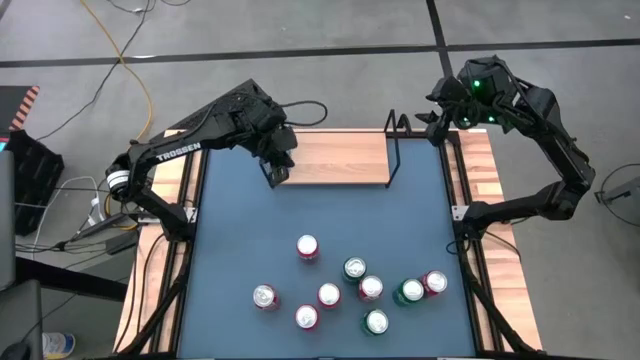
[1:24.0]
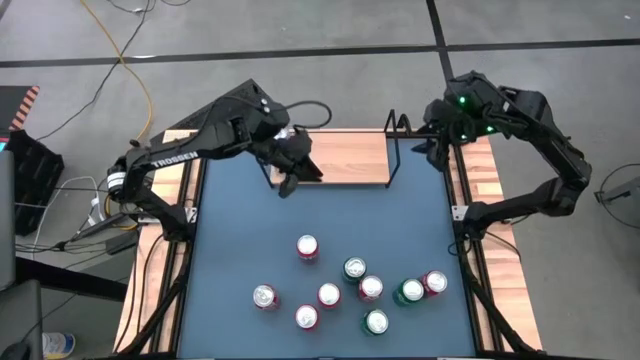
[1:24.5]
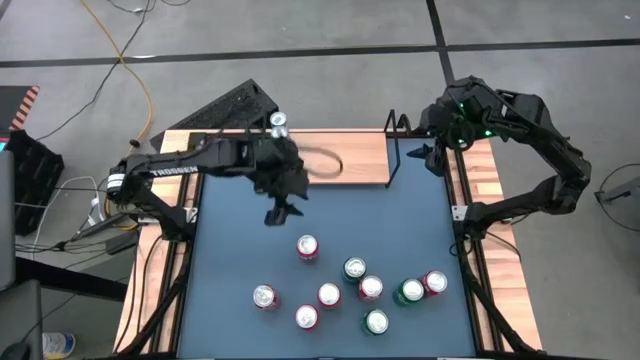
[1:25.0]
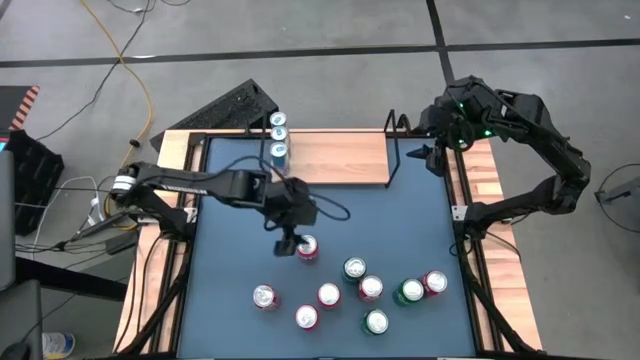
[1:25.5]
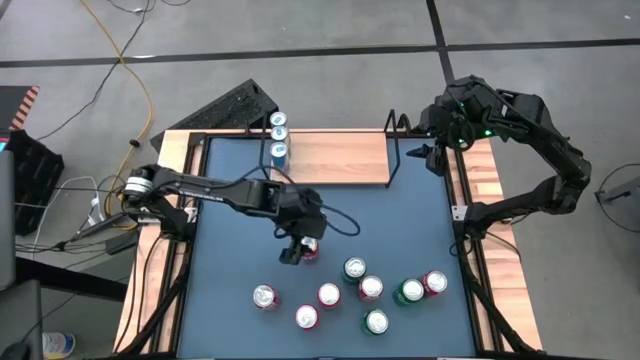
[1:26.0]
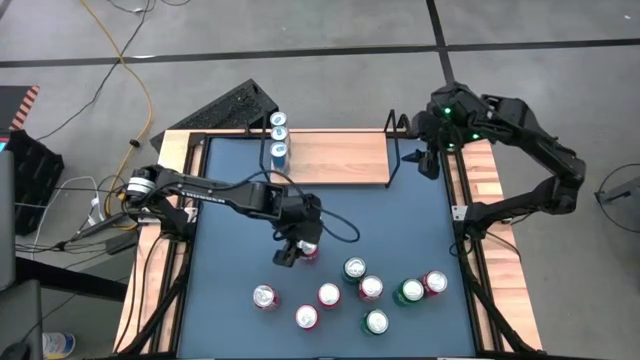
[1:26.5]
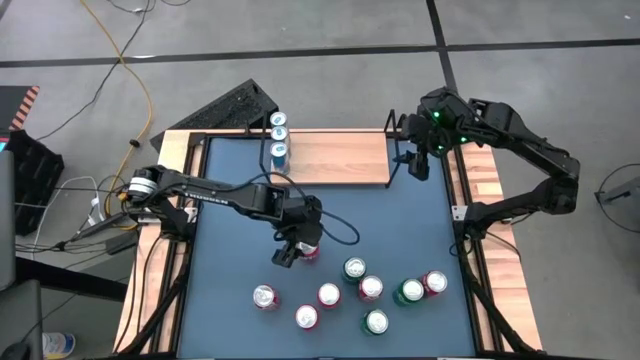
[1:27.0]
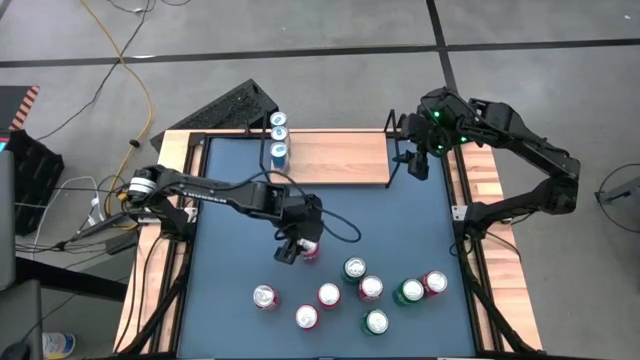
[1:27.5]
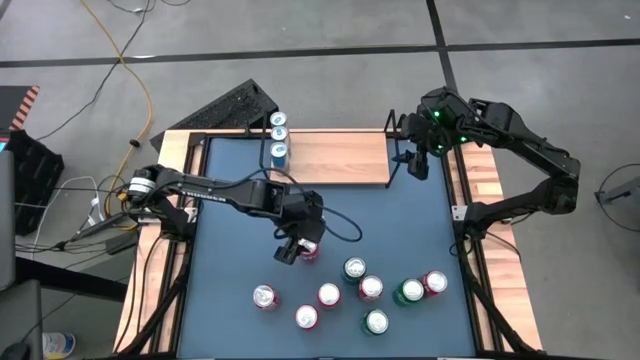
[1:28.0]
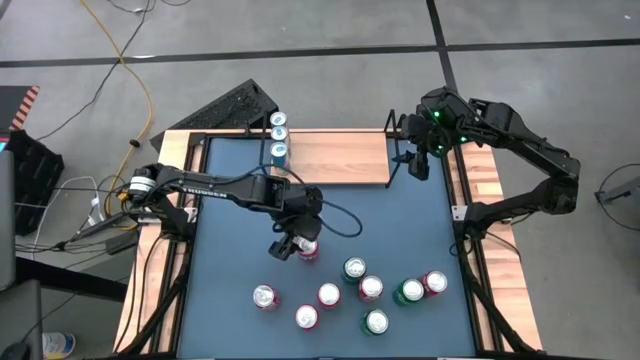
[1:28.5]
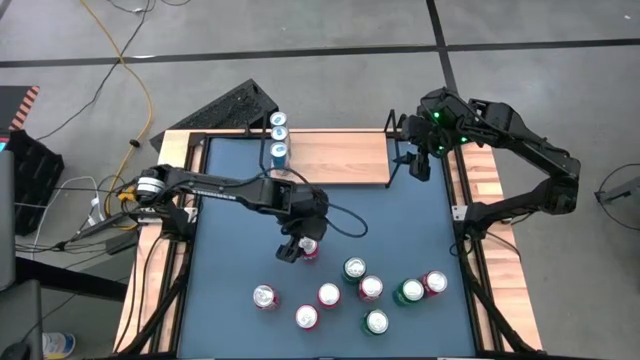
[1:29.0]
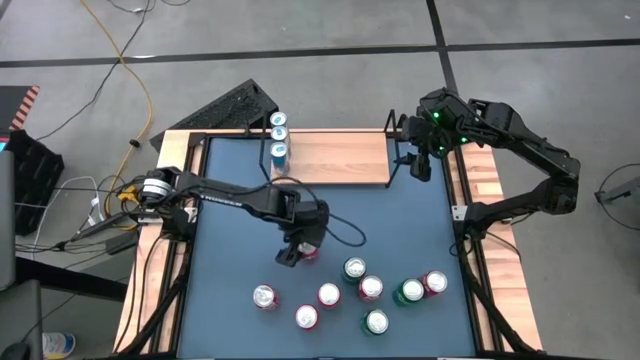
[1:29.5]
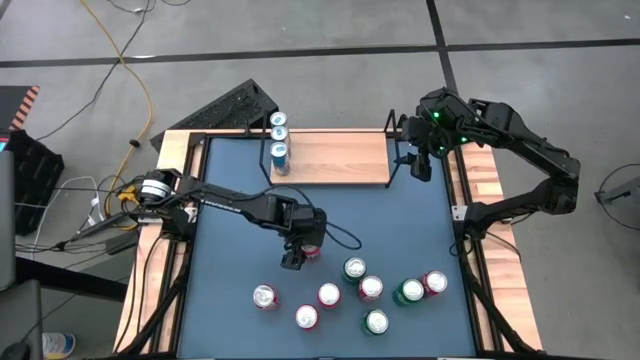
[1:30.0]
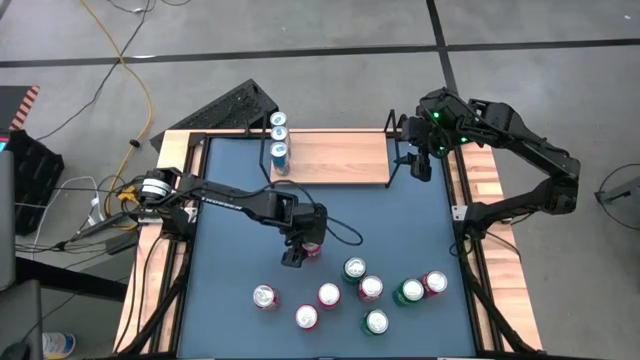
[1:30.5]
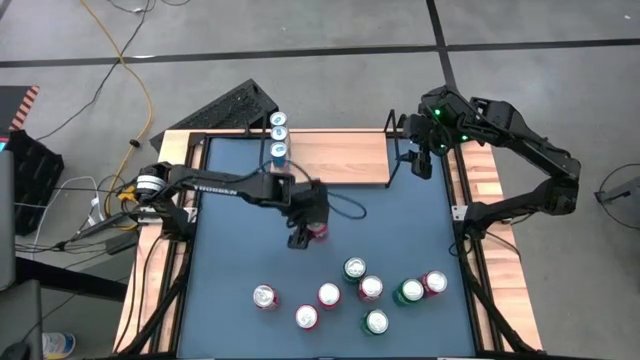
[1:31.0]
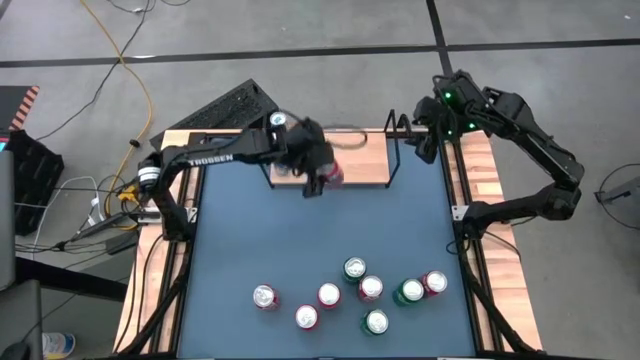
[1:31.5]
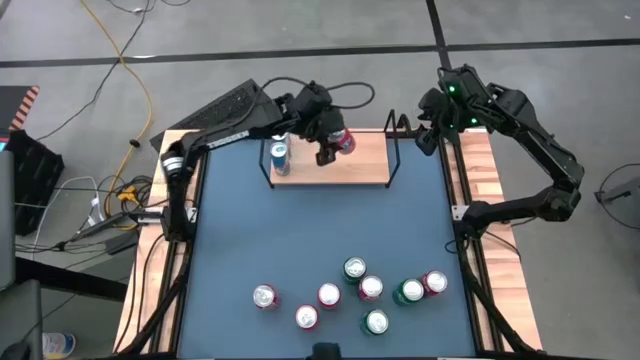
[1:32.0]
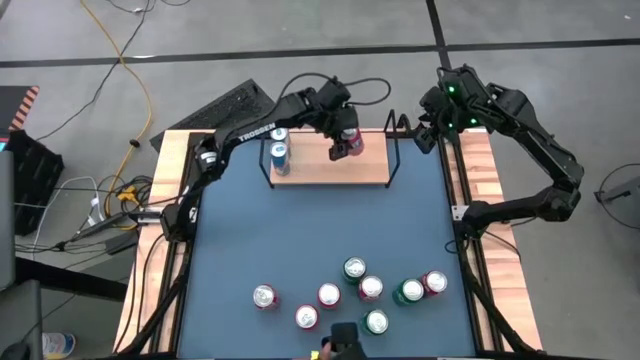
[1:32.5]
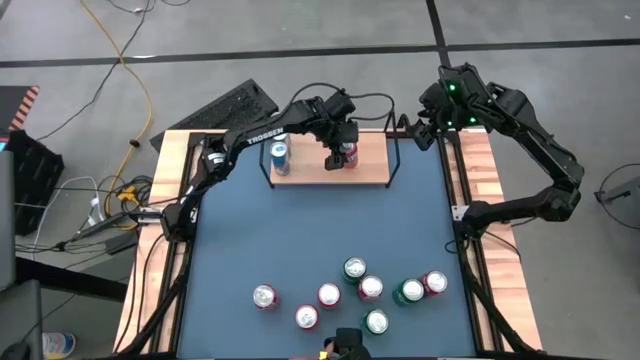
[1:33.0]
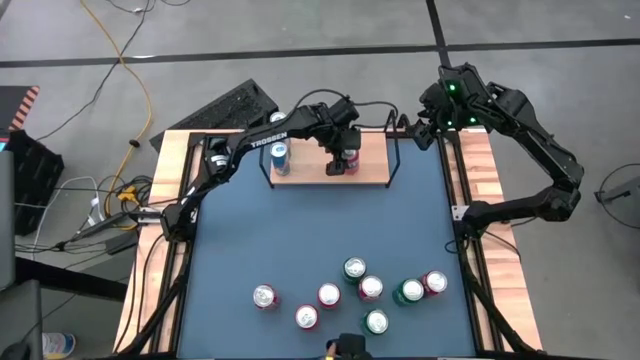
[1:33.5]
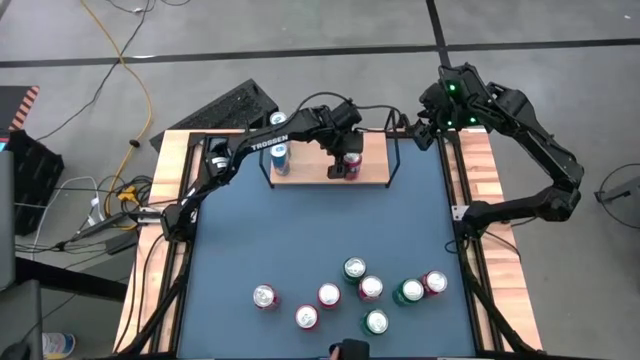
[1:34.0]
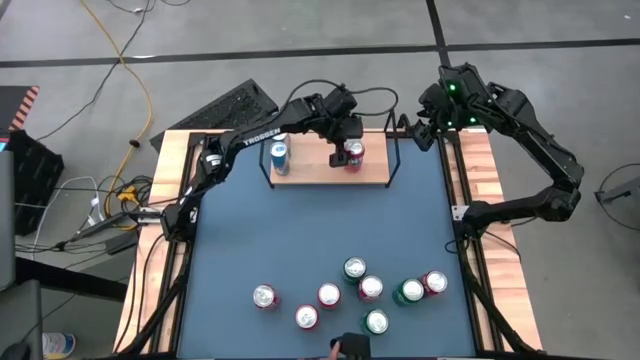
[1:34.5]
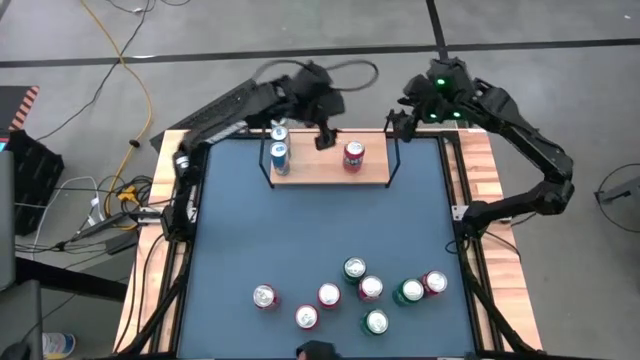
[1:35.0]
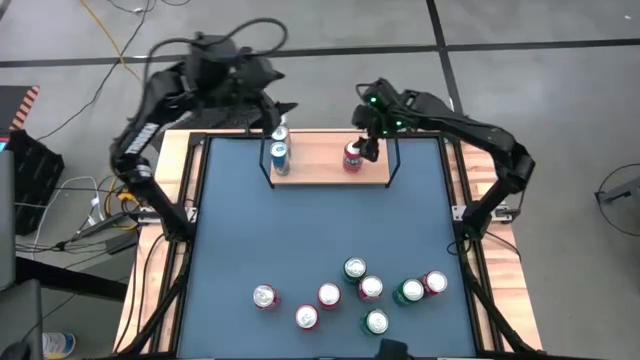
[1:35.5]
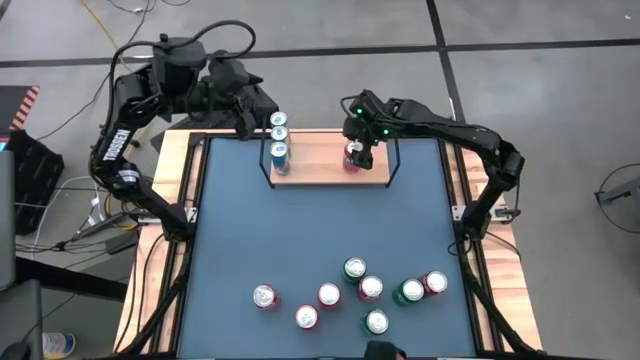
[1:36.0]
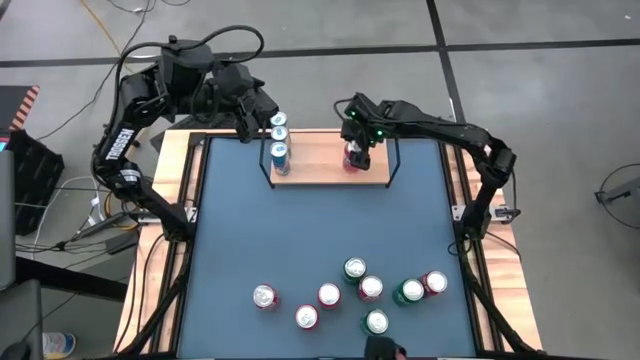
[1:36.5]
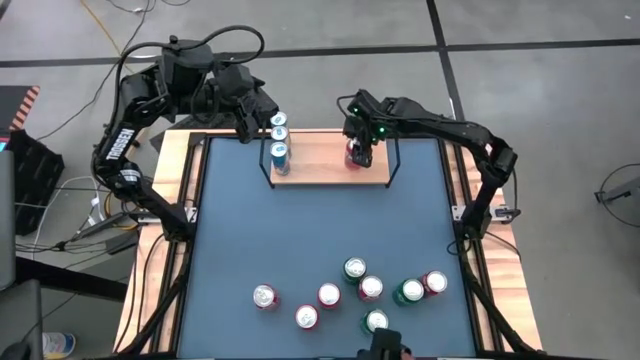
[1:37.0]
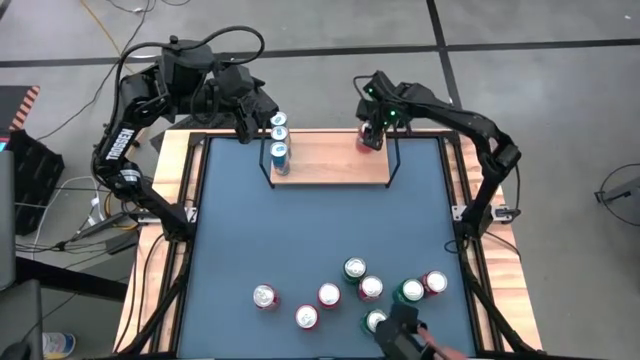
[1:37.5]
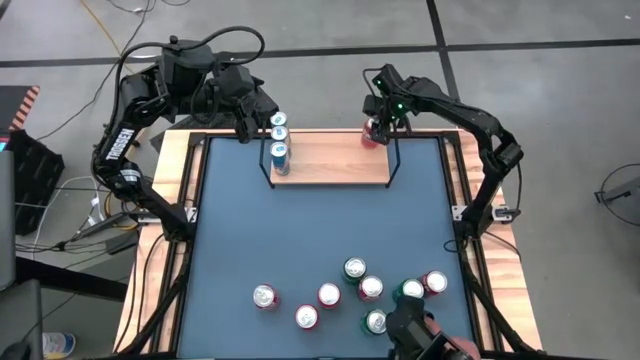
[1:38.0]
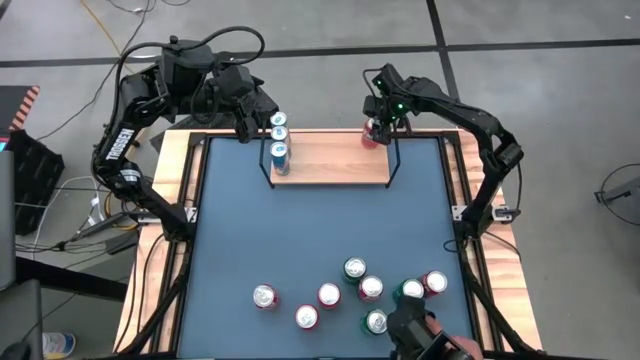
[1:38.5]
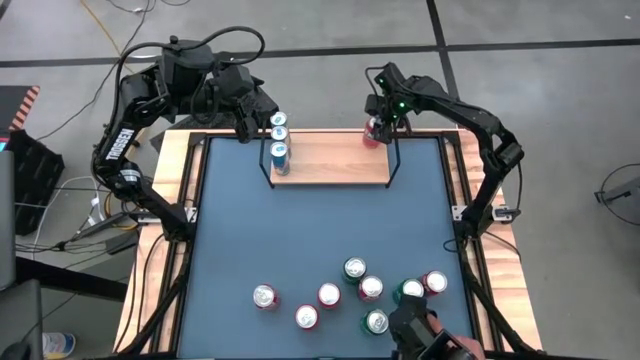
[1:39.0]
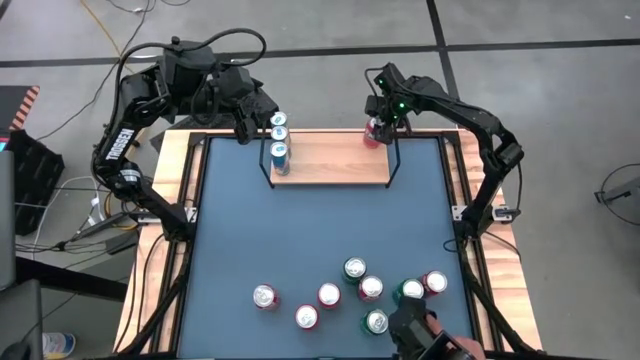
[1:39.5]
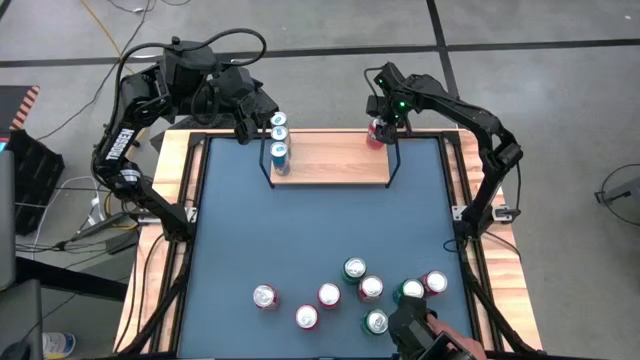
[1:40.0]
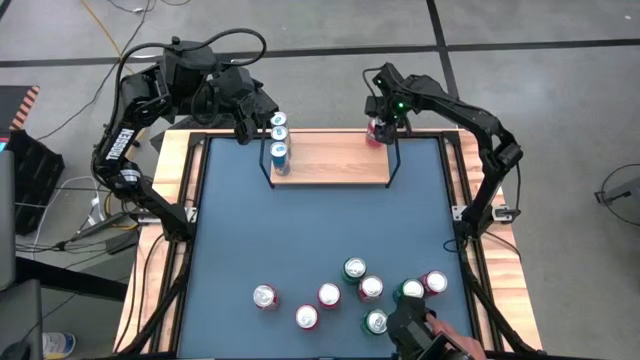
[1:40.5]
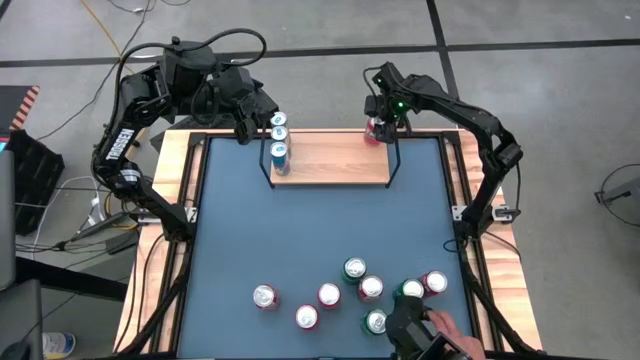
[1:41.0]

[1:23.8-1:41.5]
Task: Place canned beverage on shelf
Put the top red soda can on the shelf

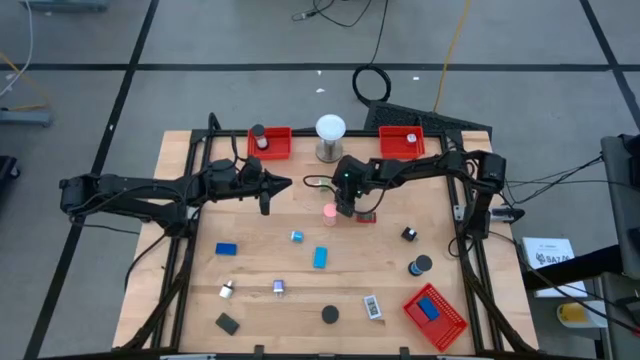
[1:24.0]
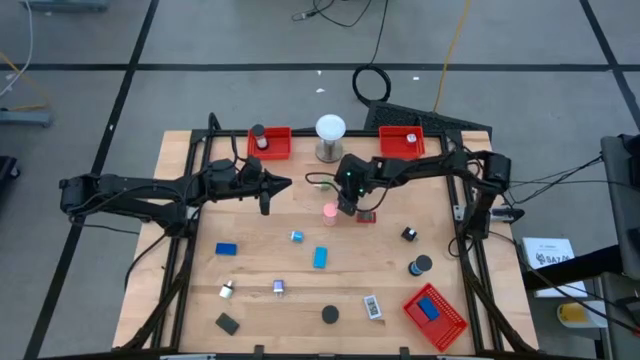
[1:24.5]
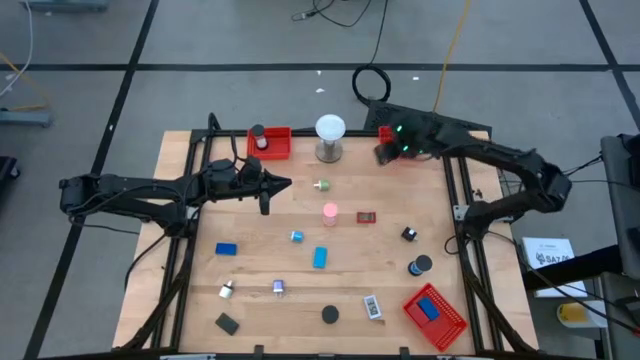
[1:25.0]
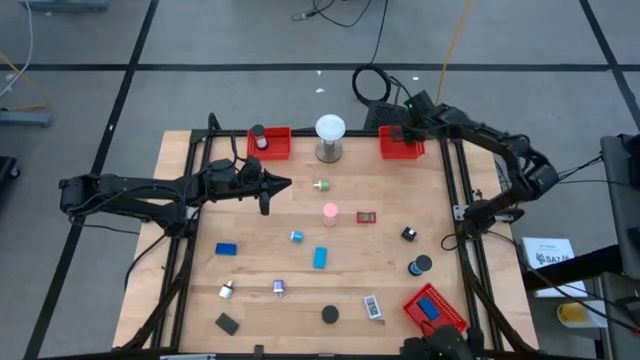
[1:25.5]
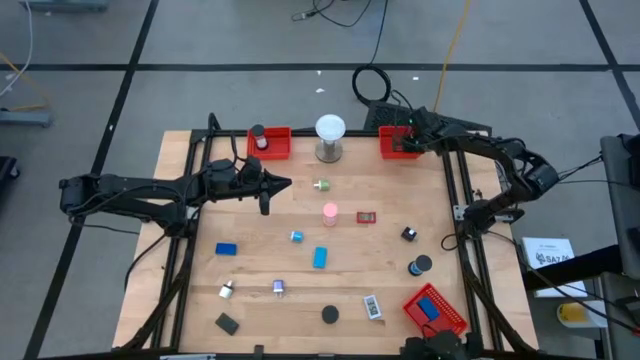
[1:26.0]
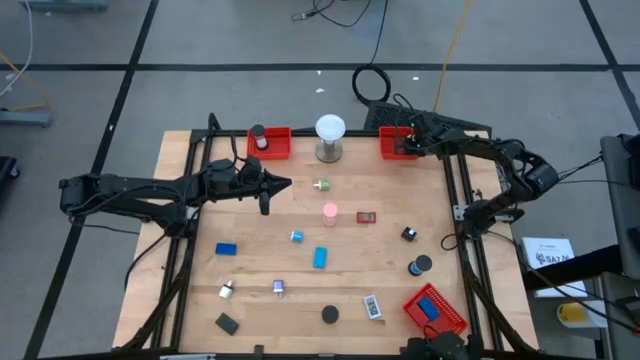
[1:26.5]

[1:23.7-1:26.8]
Task: Pick & Place Office items
Put the black charger adapter into the top right red bin
